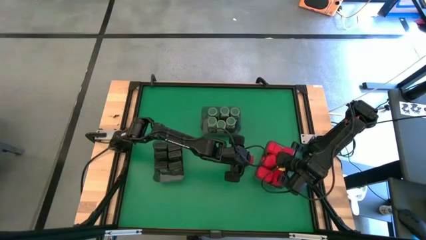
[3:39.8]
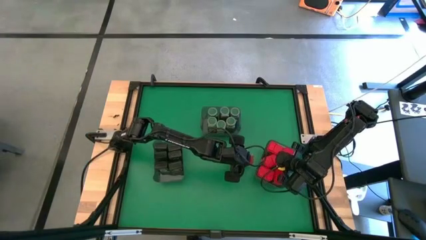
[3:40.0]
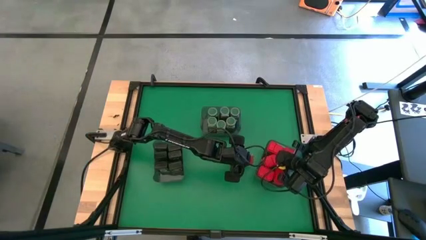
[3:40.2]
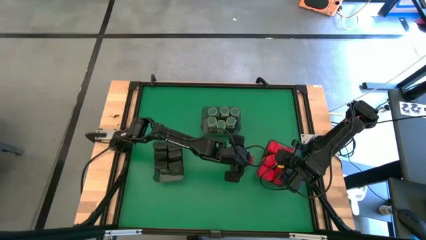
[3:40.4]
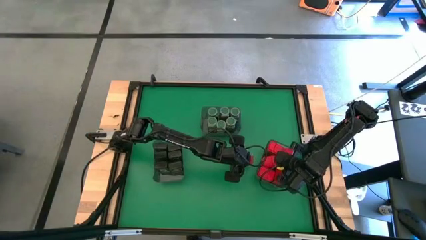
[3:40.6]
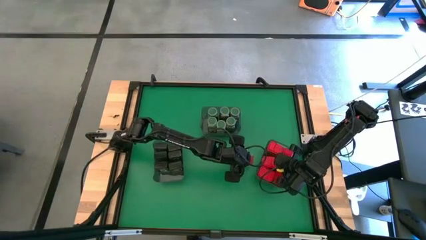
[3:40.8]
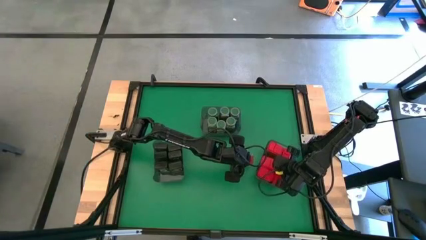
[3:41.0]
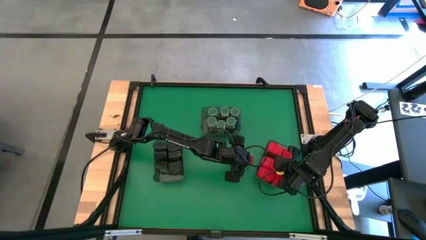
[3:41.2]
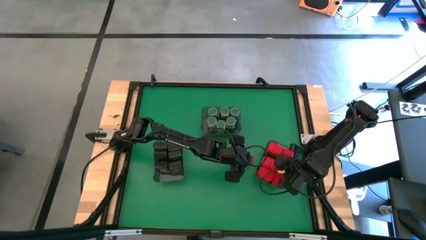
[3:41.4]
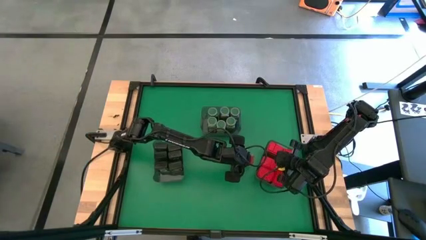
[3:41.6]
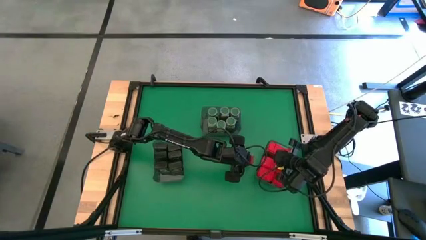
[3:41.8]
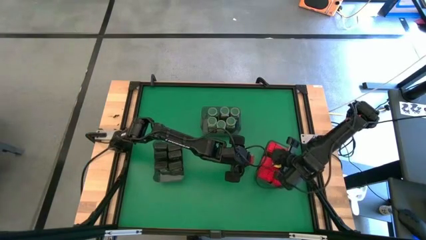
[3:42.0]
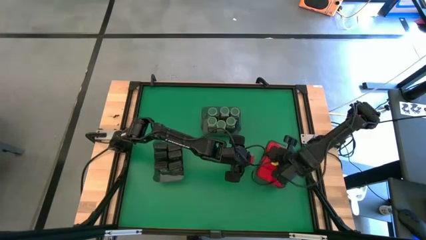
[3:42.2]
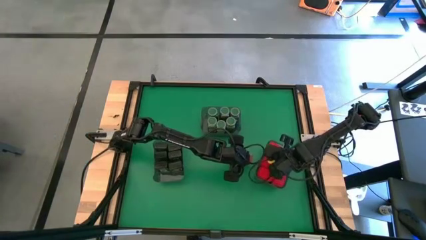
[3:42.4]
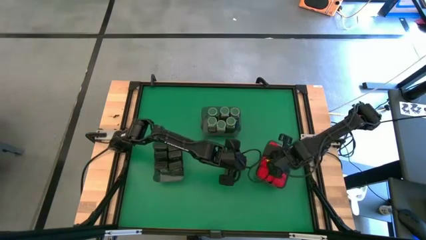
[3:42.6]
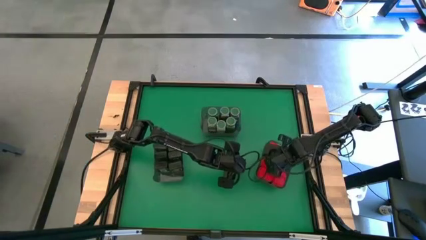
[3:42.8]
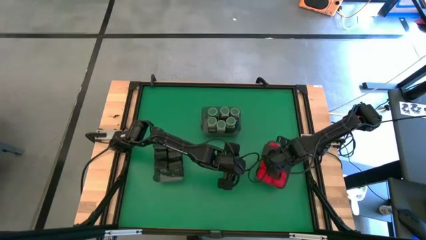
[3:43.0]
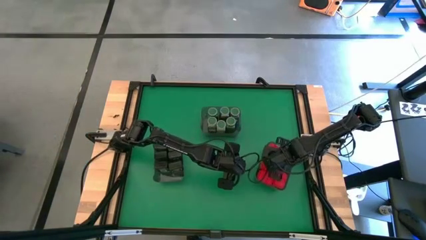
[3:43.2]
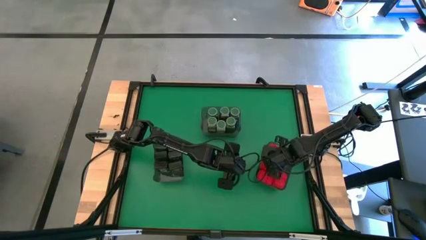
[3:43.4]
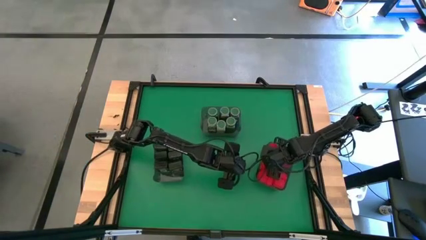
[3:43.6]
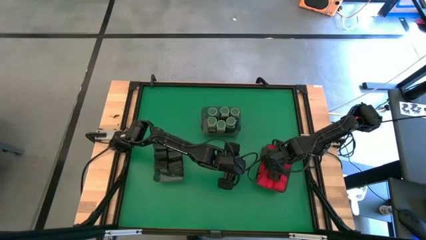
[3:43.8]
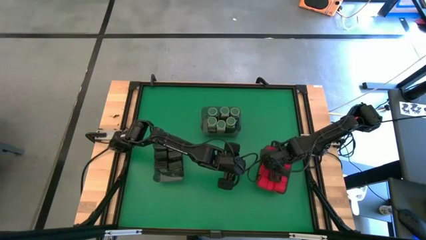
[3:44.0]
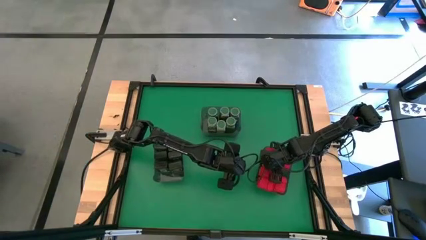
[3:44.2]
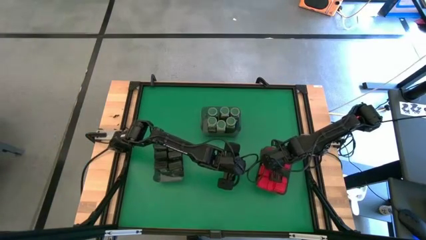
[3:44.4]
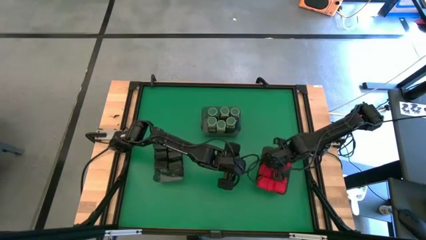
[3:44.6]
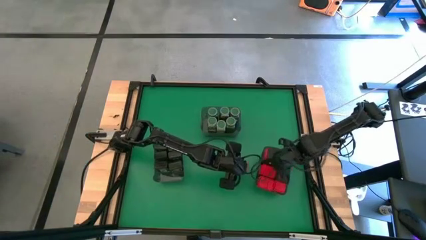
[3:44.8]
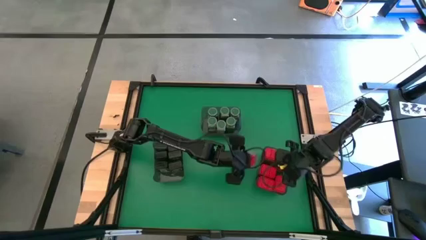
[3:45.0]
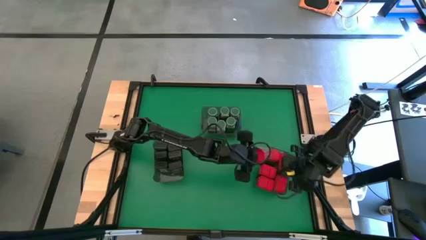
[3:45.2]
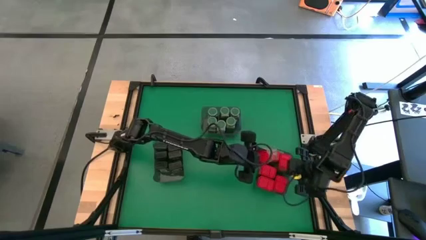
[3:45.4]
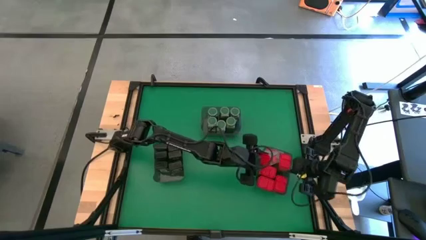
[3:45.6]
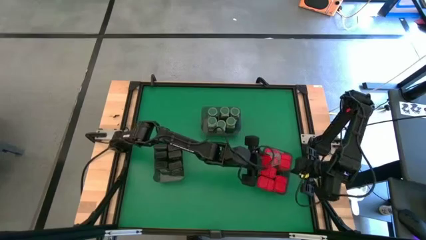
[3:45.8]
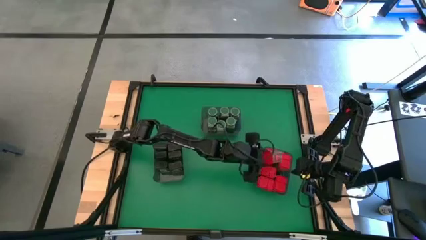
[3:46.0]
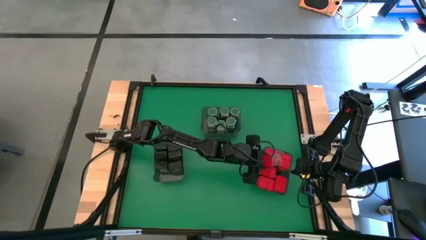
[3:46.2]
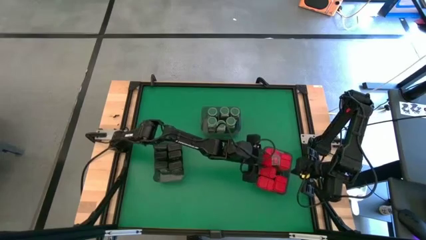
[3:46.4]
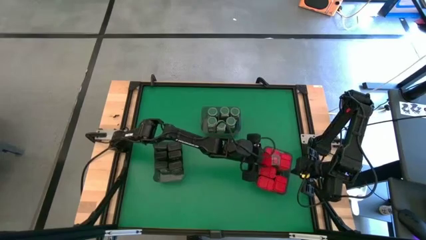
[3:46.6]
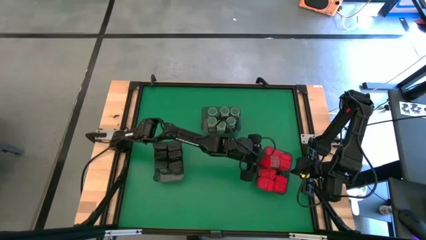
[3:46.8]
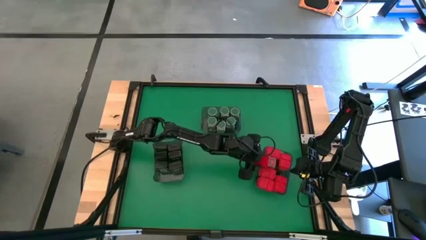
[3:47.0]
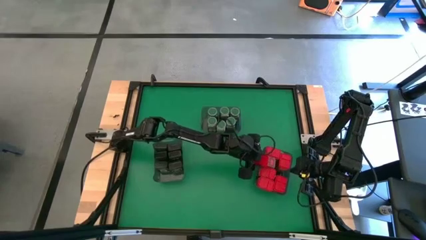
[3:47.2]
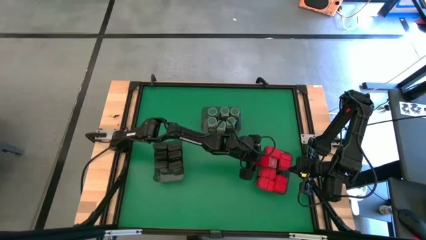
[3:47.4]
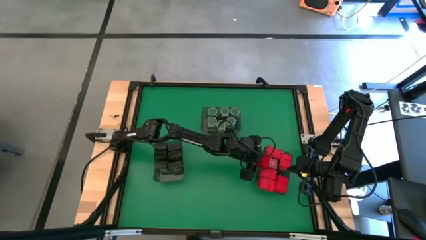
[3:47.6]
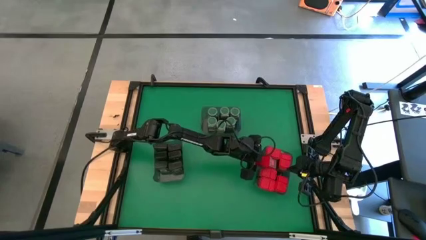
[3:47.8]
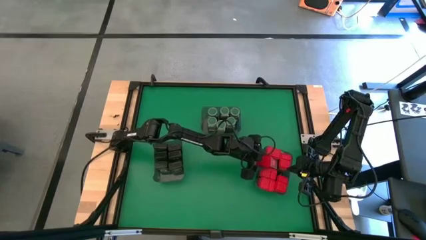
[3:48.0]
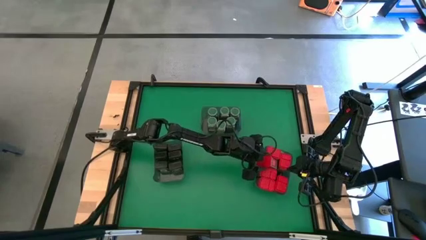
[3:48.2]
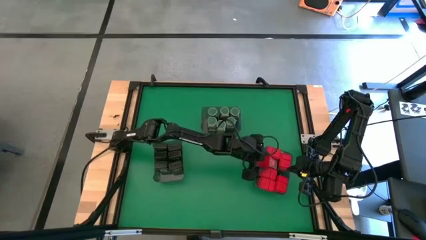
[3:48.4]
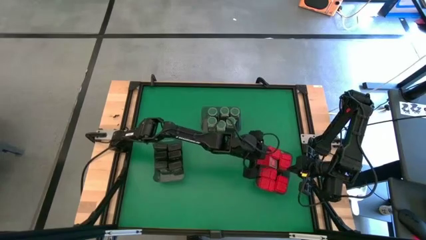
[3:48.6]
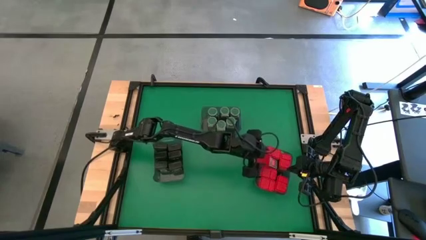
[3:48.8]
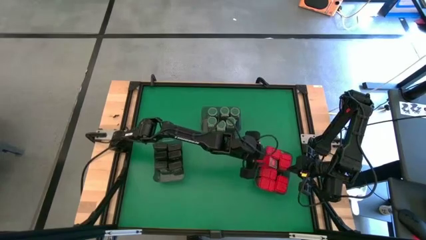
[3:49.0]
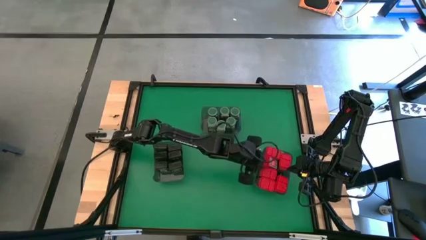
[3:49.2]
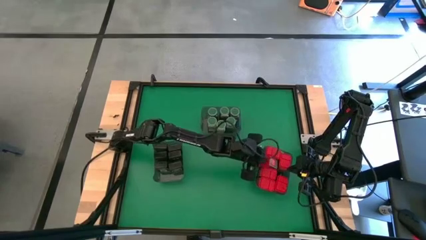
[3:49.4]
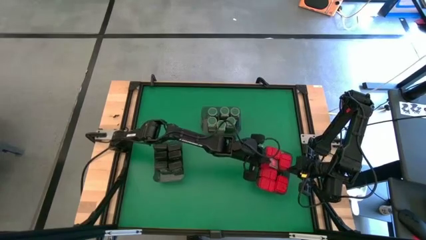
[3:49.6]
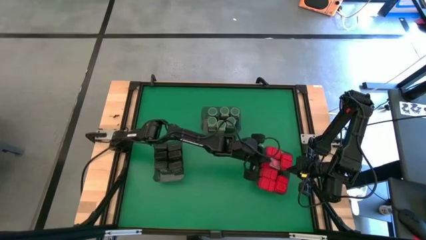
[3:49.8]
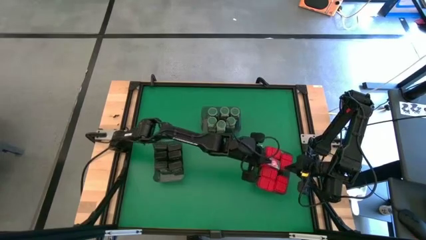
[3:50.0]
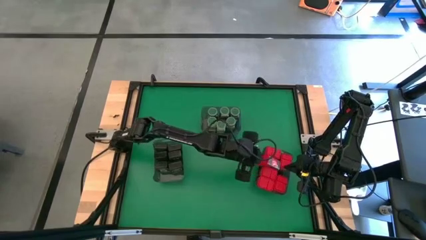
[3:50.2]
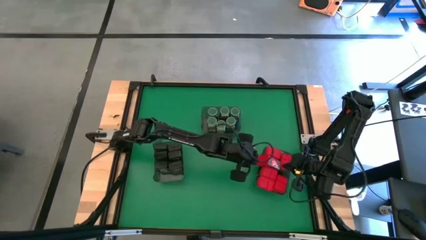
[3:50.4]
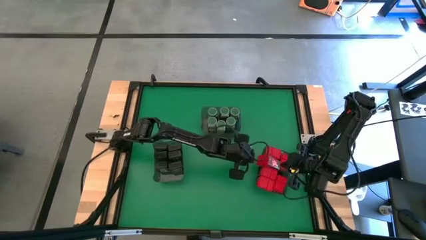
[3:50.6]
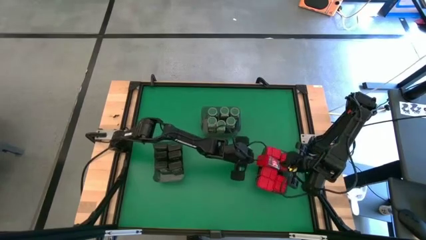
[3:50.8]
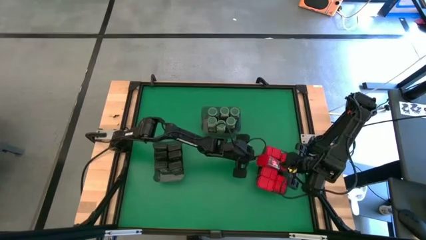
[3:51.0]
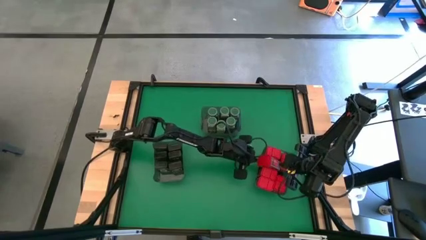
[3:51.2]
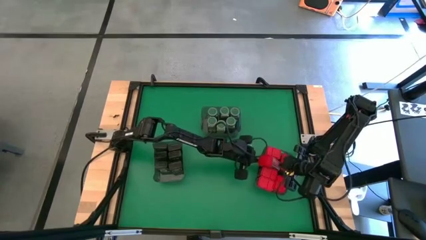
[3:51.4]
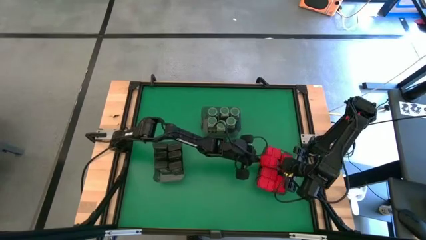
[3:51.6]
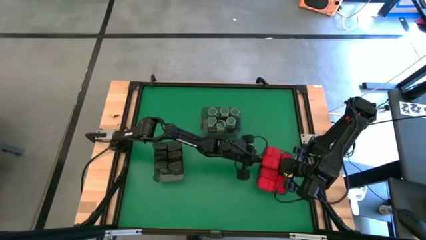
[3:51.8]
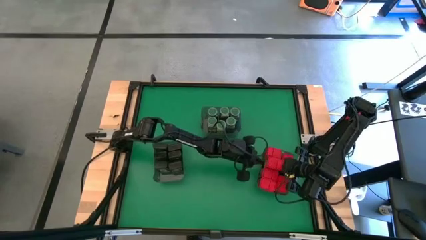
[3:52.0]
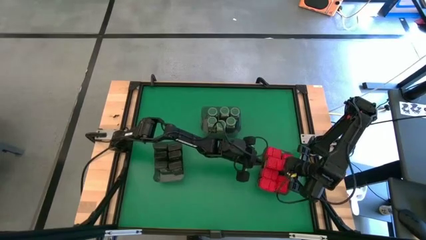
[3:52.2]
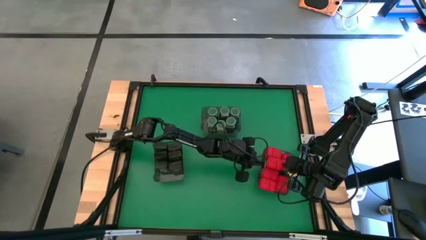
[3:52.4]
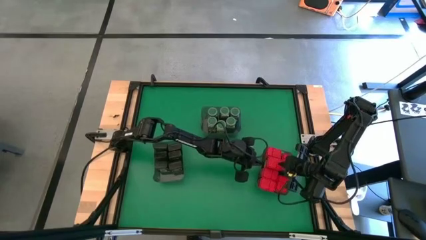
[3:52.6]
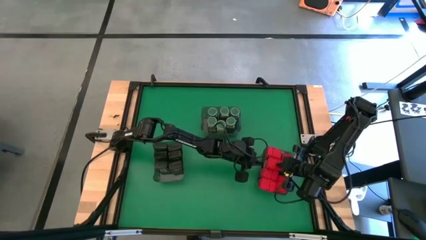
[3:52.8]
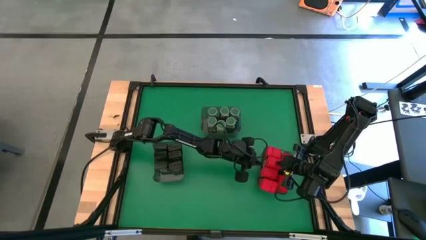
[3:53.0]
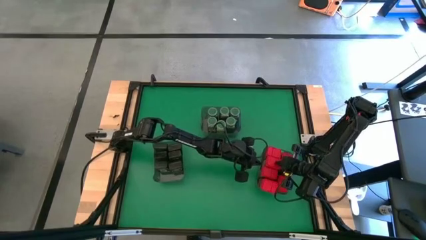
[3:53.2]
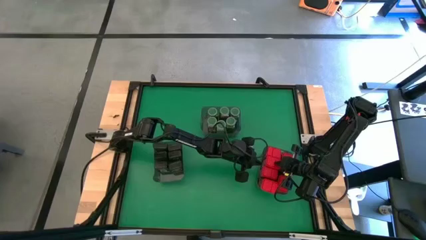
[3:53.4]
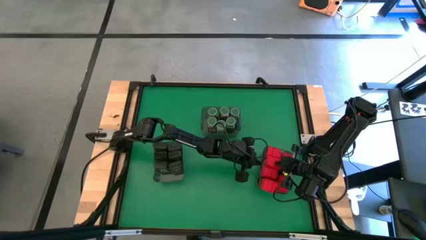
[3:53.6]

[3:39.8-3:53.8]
Task: Sort spices by type
Put the red seasoning can into the right black bin

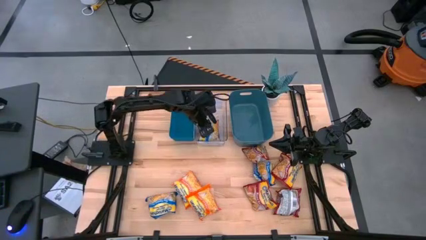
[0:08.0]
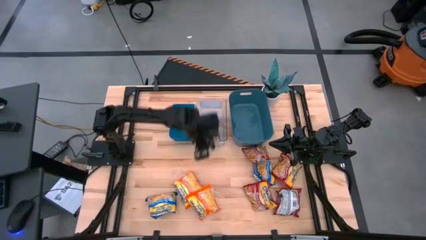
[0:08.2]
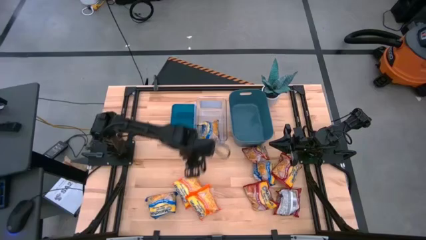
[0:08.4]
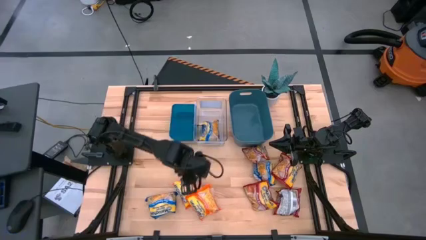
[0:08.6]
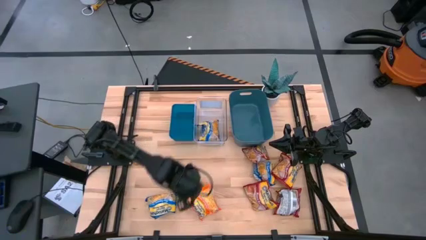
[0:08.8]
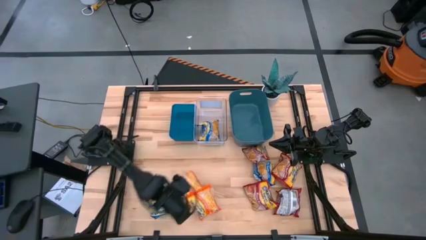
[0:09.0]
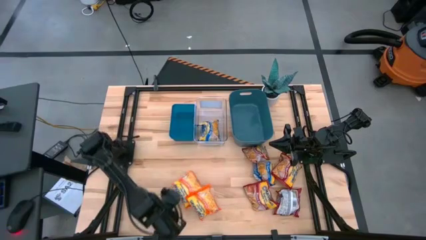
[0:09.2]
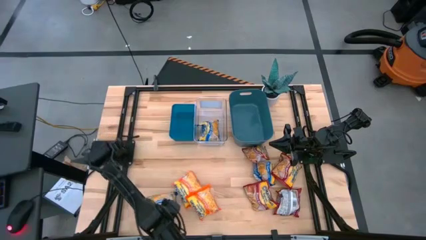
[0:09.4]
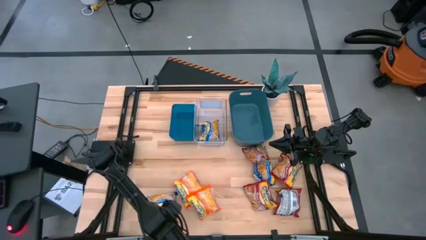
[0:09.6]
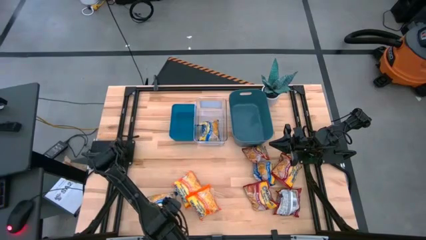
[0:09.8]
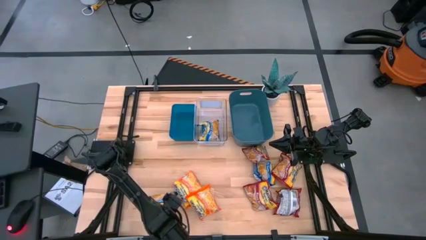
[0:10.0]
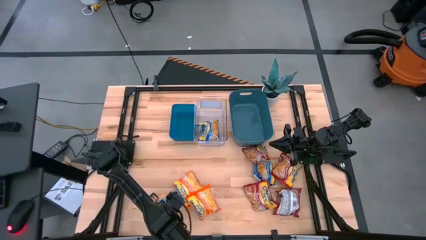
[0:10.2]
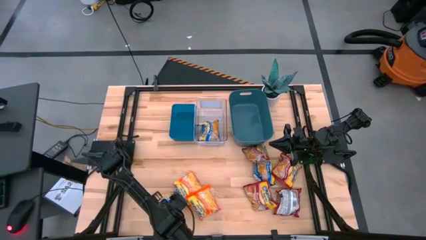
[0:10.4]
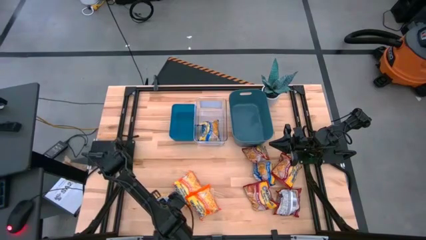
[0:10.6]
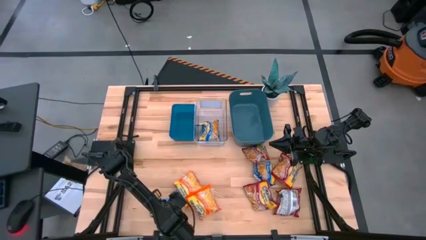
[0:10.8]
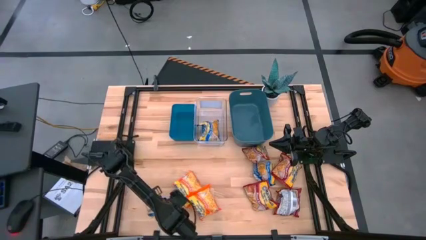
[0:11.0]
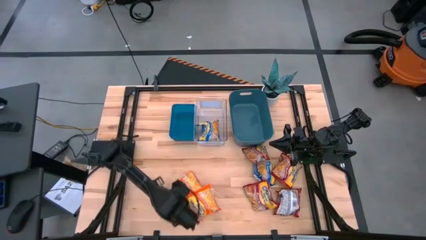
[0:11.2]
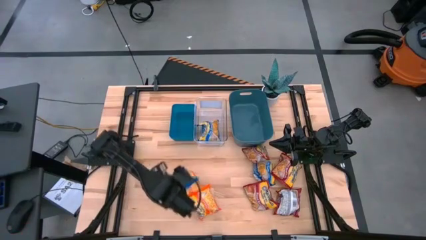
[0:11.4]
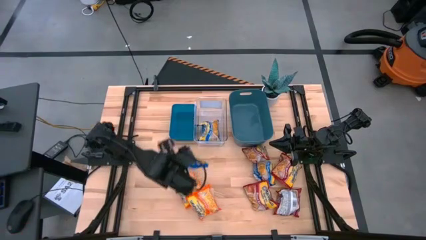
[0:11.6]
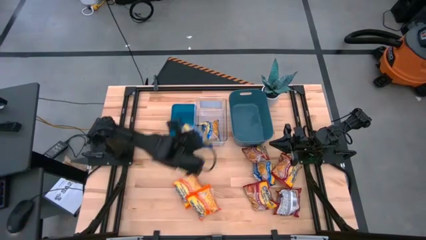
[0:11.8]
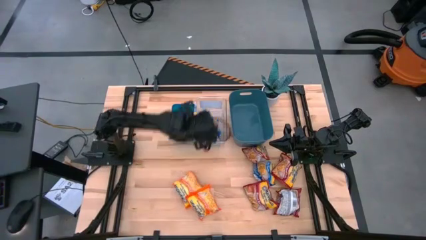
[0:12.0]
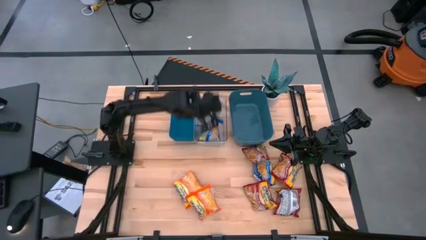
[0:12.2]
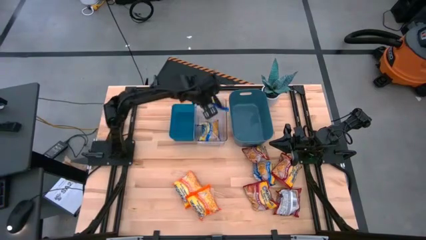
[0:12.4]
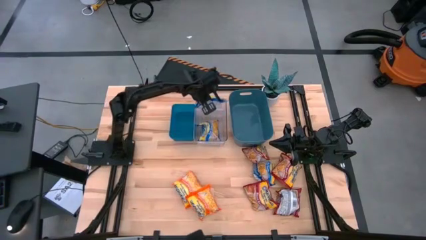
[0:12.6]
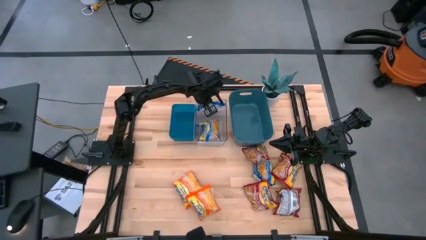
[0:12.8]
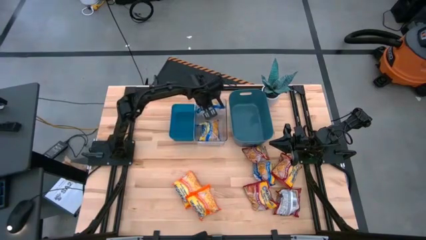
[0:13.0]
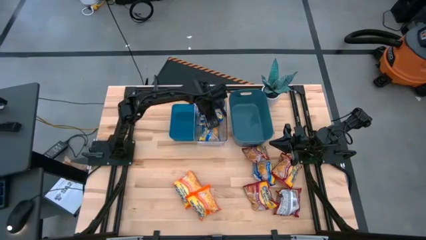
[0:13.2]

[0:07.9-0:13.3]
Task: Sort Maruchan noodles
Put the bottom blue noodle pack into the transparent bin
